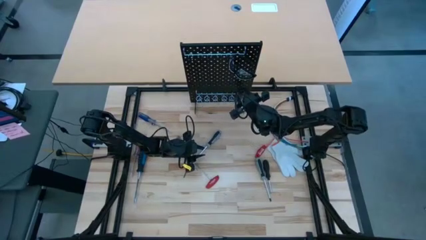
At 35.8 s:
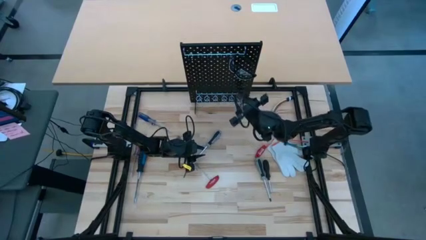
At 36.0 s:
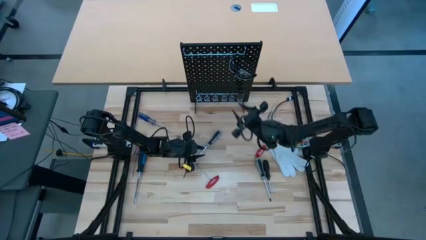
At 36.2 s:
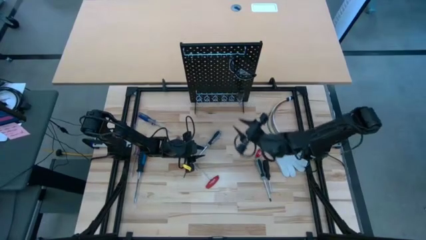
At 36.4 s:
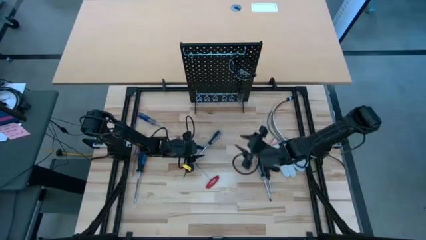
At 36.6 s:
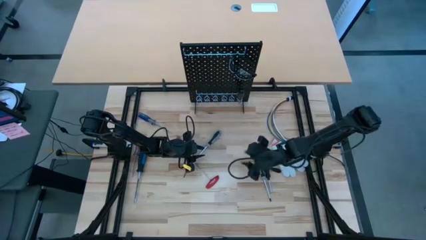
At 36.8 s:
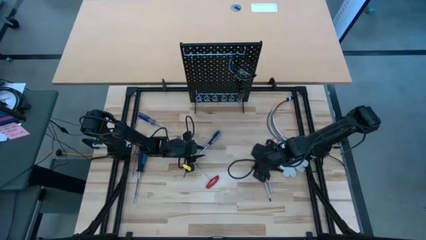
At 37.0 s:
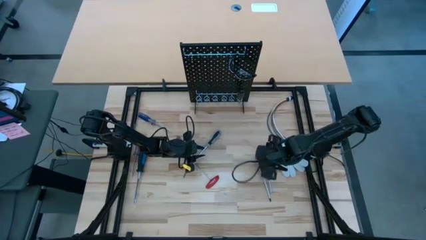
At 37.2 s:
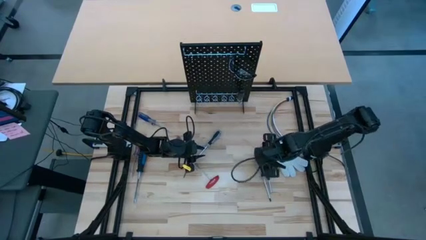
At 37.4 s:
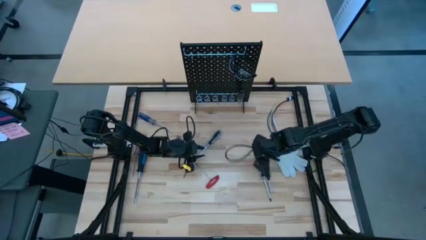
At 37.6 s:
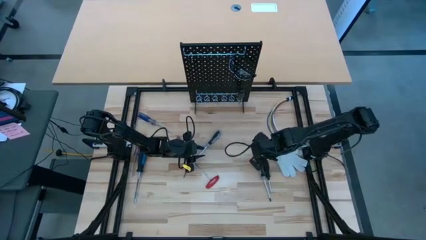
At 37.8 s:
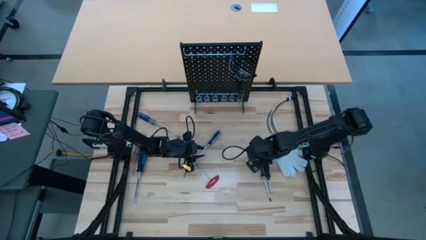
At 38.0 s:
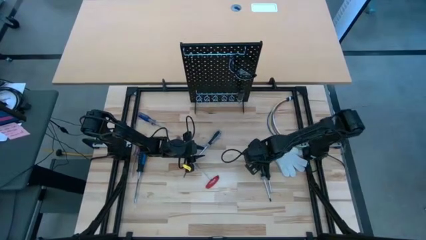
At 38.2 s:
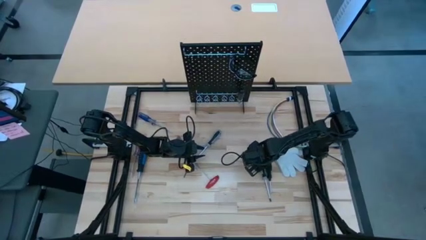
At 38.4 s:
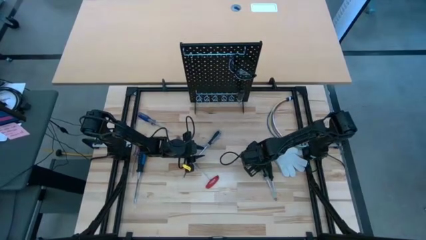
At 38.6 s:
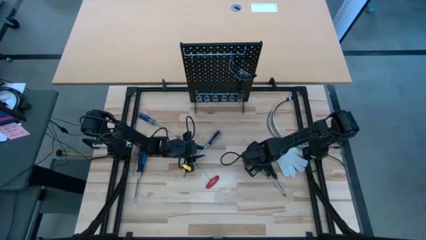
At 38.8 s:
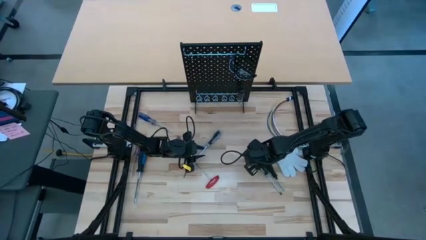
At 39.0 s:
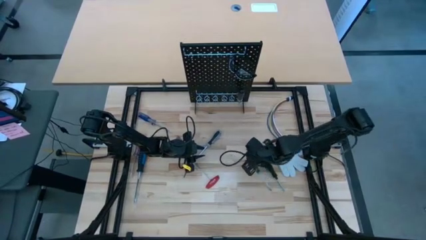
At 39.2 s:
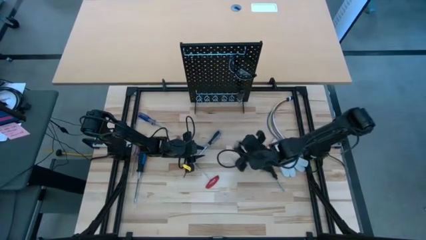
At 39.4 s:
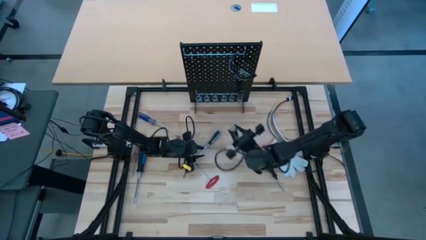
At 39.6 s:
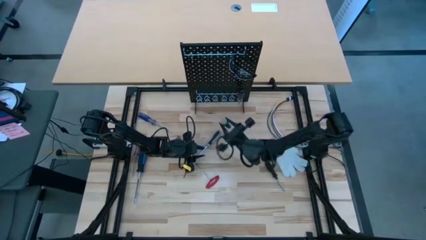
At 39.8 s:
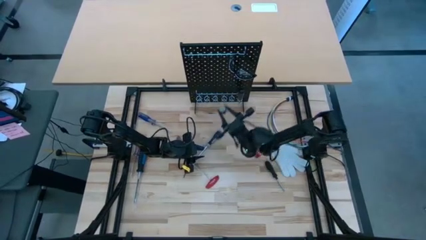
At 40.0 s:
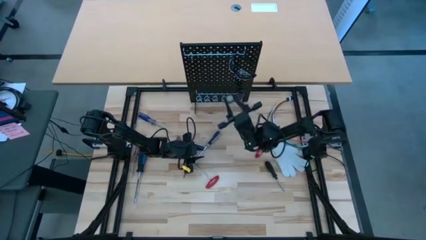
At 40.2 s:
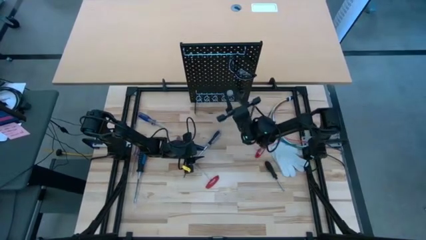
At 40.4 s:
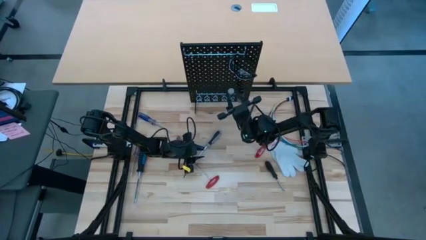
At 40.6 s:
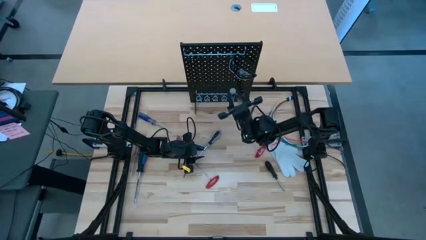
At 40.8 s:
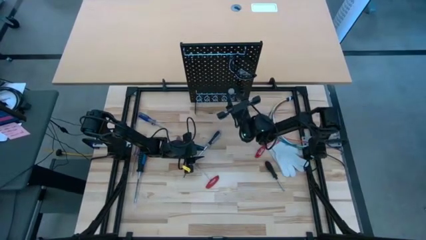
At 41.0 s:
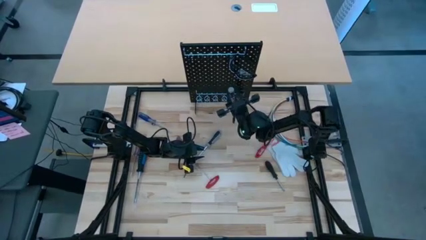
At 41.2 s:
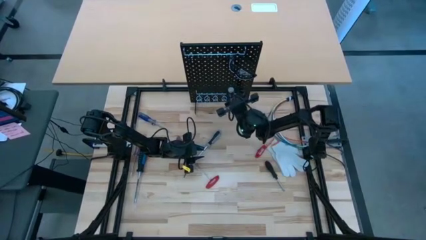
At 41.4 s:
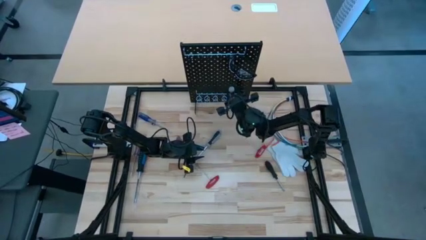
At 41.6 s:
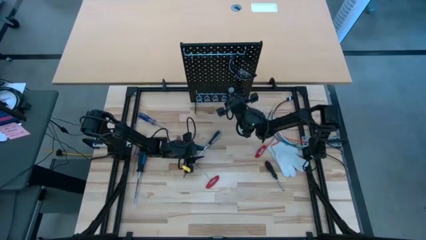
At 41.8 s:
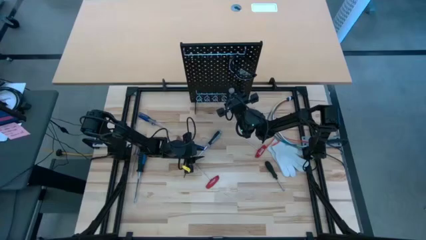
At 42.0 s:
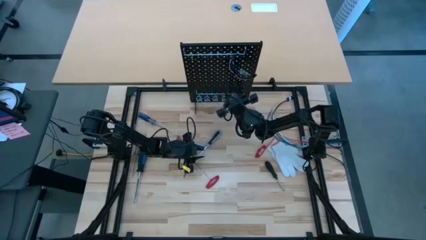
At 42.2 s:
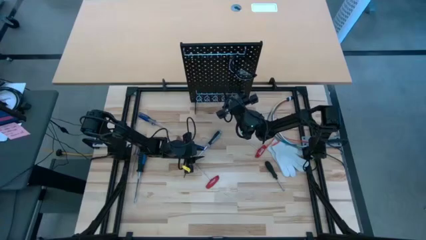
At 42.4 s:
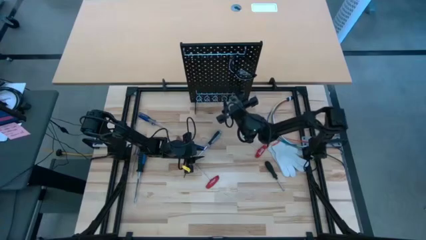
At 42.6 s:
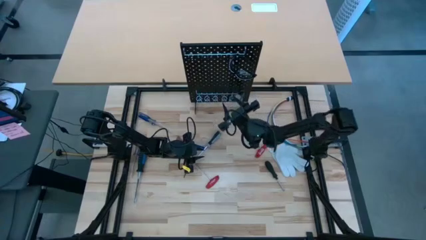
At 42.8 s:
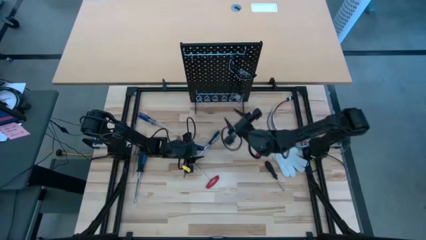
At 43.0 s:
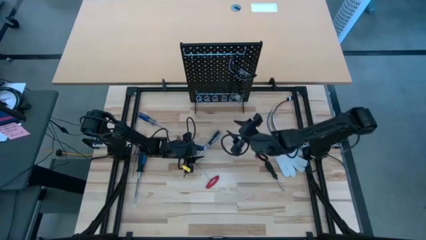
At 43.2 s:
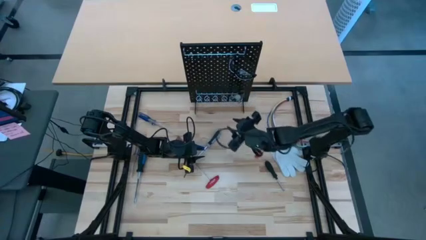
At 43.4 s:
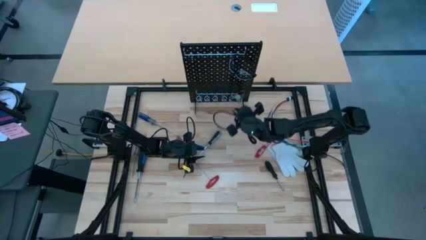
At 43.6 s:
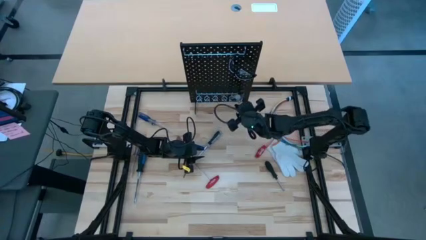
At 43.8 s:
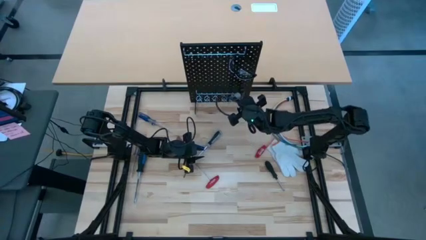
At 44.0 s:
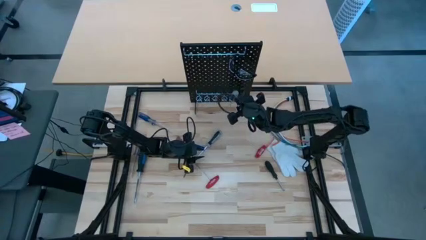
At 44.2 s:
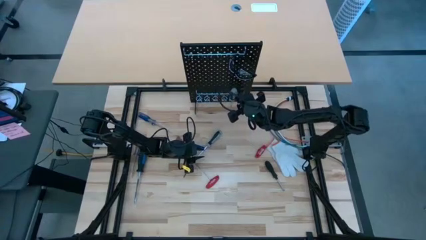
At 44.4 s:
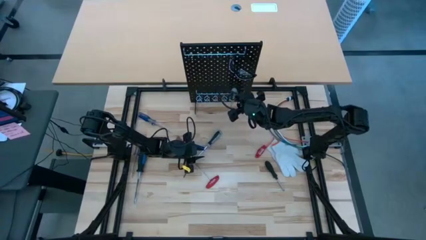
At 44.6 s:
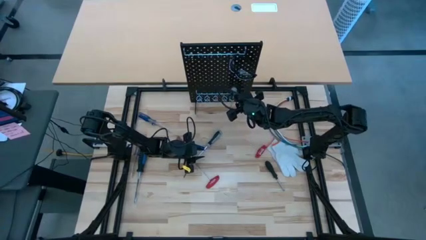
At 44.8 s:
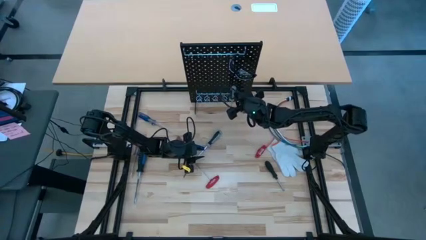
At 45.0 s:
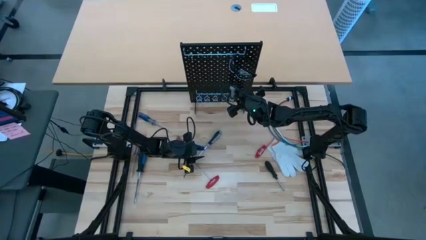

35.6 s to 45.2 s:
Task: Hang tools onto peg board
Hang the bottom gray screwdriver on the pegboard

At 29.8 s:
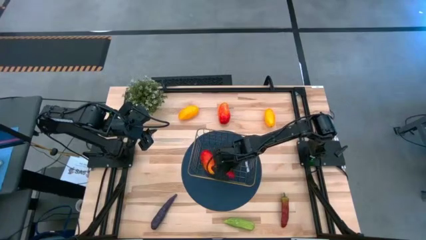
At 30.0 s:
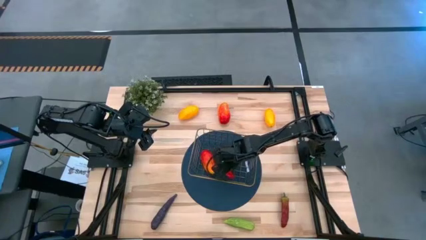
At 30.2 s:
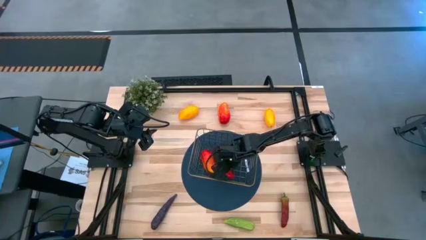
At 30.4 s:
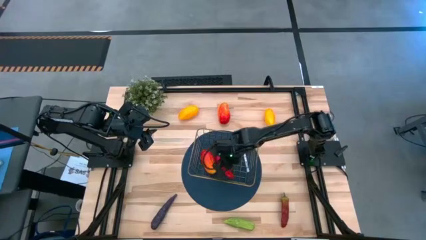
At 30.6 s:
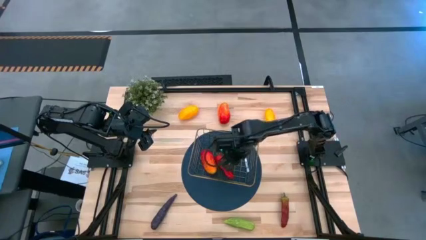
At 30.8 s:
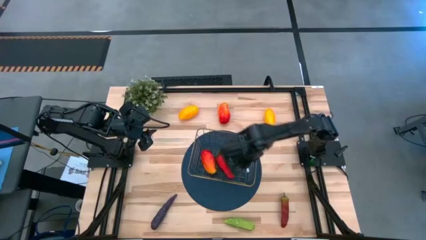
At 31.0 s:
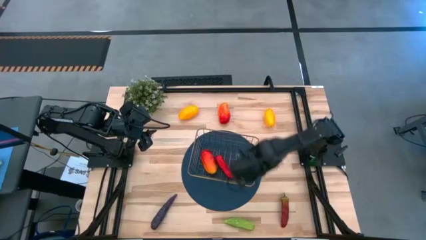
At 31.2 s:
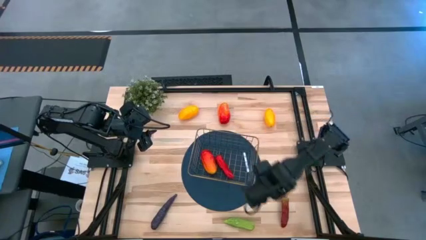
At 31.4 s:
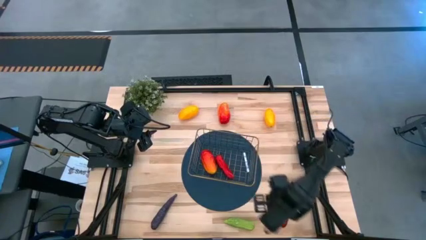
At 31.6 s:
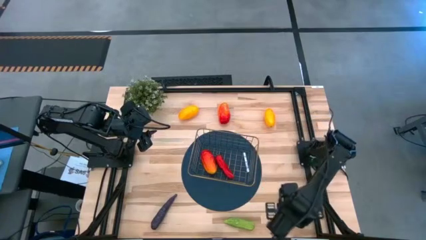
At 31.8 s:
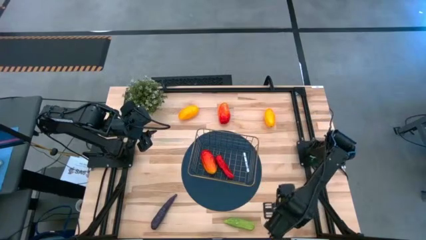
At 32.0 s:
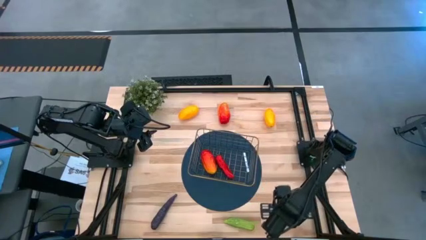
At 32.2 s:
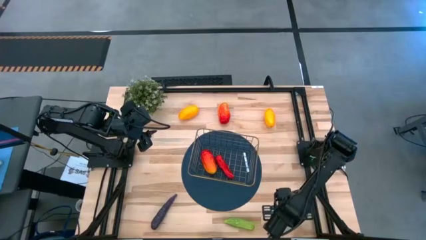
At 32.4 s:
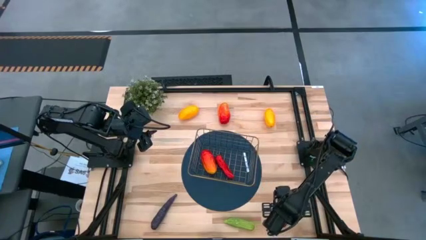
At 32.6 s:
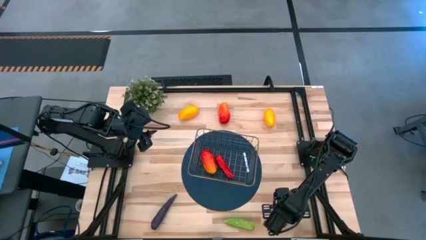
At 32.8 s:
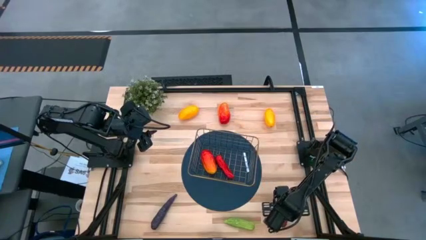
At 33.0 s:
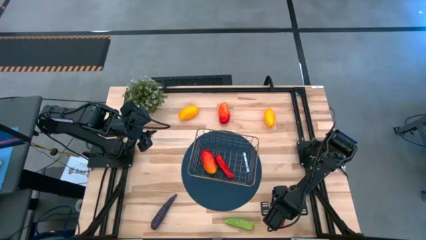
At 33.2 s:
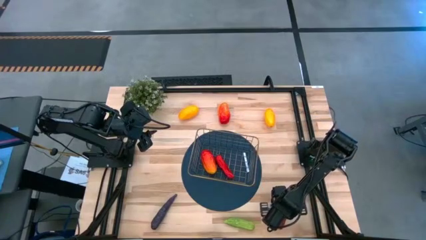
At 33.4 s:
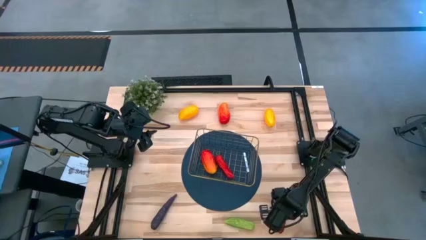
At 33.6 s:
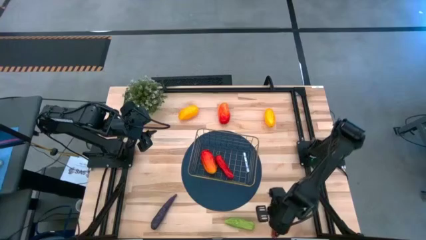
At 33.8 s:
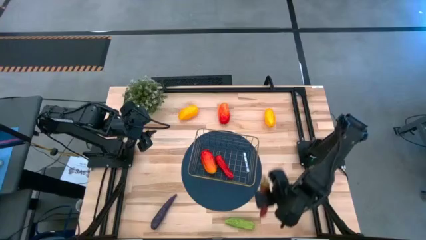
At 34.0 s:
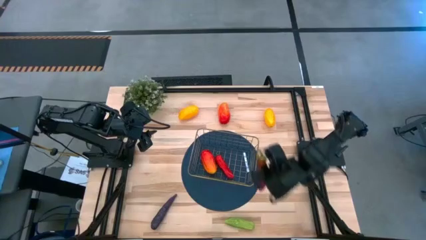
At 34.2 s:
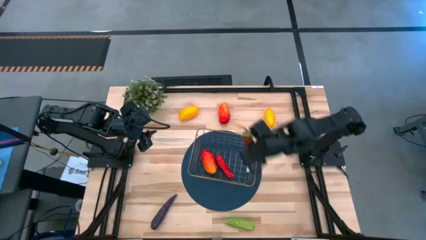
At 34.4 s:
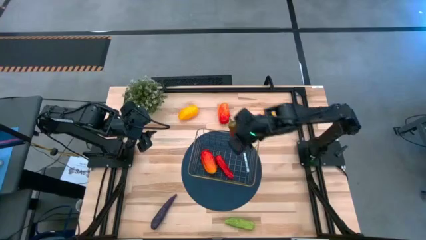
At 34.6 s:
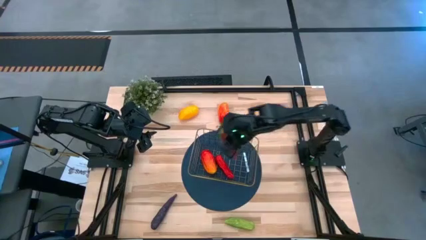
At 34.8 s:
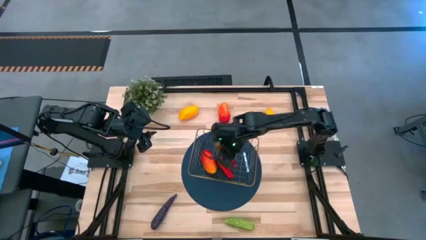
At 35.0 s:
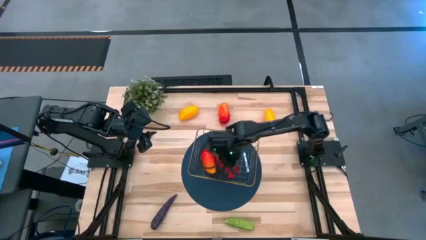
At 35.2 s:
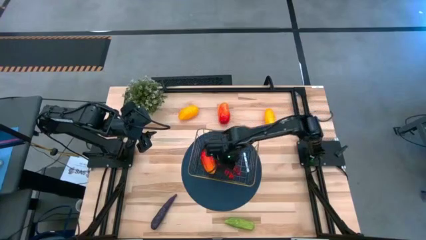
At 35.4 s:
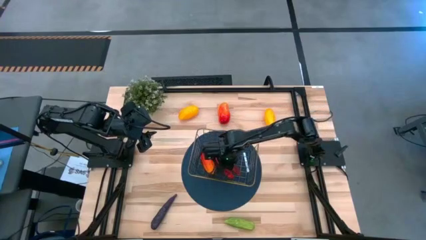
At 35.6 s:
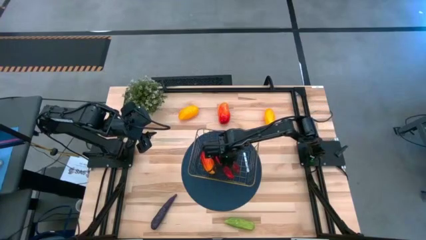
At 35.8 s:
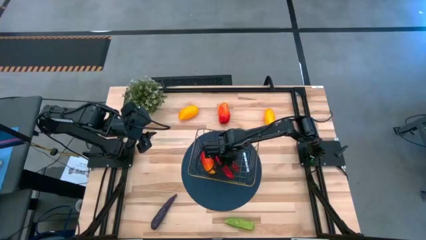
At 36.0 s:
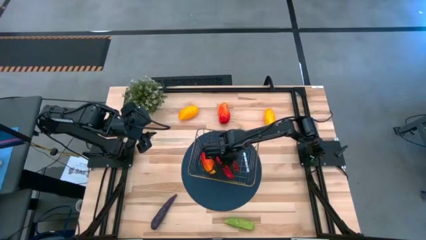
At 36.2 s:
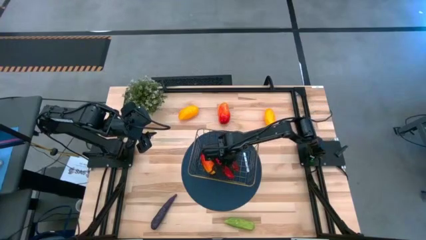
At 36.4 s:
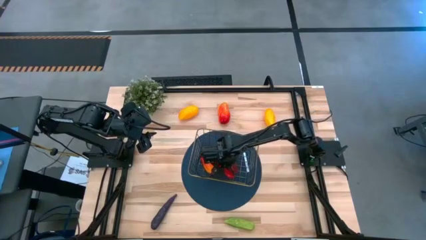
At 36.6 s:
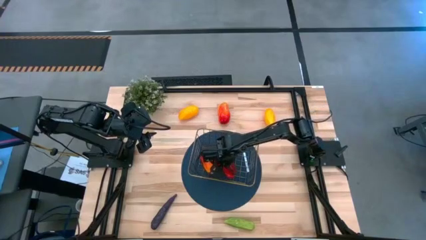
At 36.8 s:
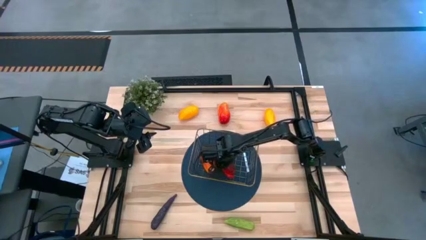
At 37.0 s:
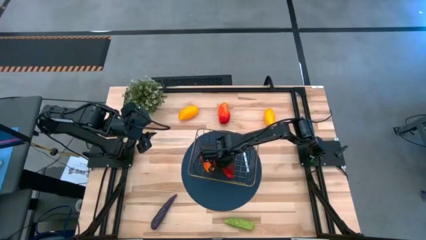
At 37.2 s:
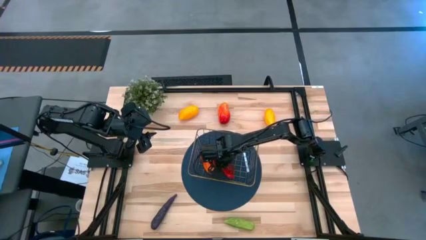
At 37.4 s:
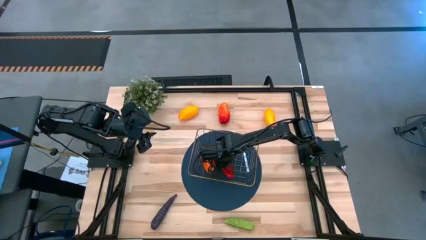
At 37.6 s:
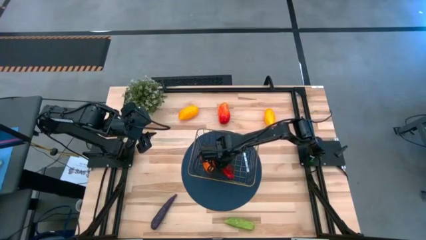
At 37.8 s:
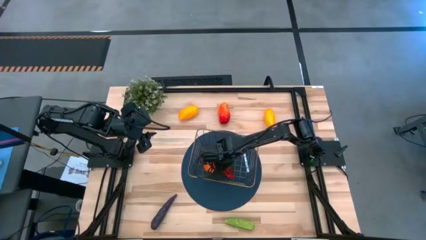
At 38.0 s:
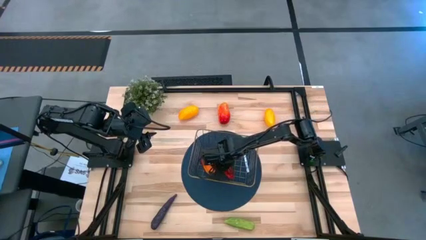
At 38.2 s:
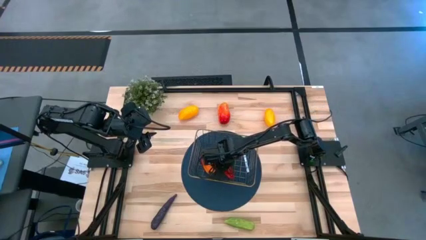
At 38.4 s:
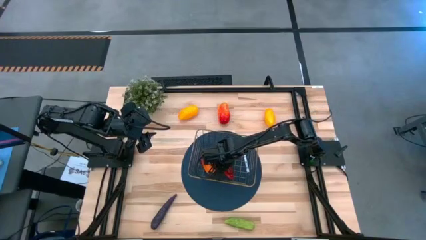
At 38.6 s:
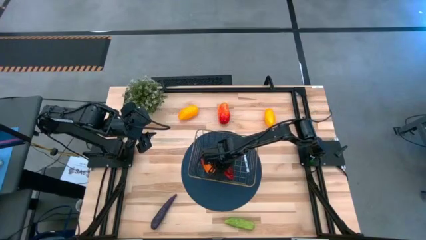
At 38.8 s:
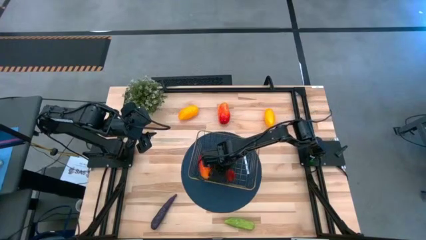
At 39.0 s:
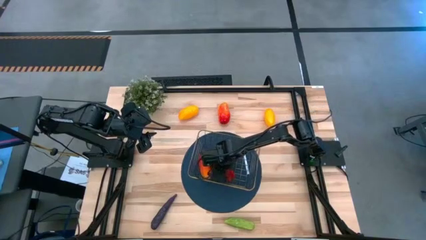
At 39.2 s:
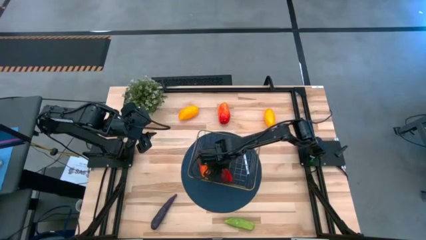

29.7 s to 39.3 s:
Task: Build produce basket
Put the dark red chili pepper into the gold wire basket
